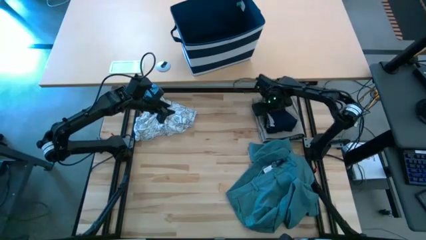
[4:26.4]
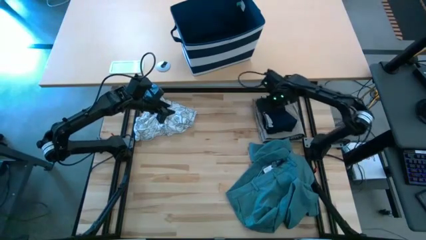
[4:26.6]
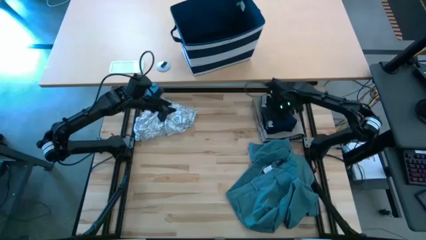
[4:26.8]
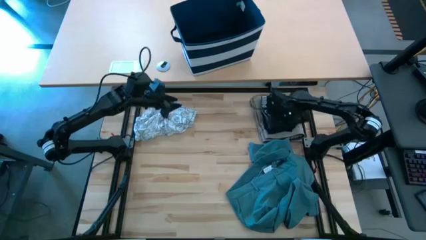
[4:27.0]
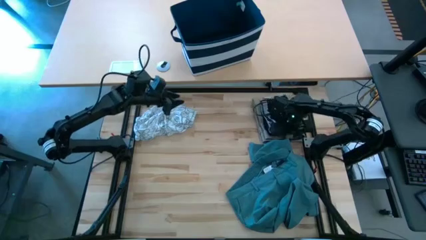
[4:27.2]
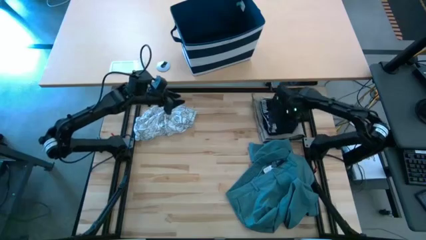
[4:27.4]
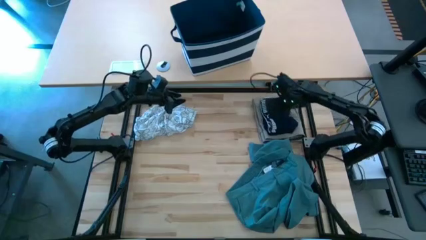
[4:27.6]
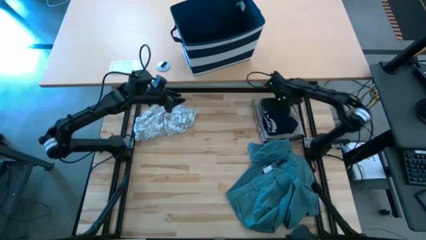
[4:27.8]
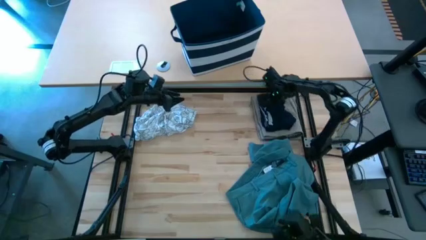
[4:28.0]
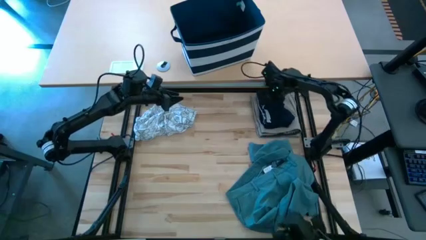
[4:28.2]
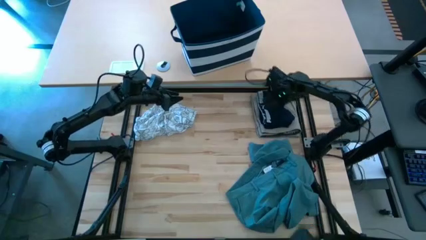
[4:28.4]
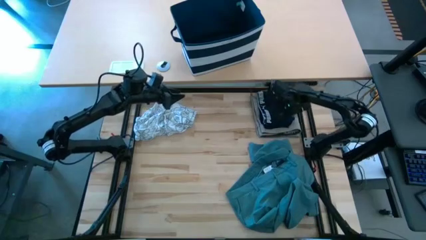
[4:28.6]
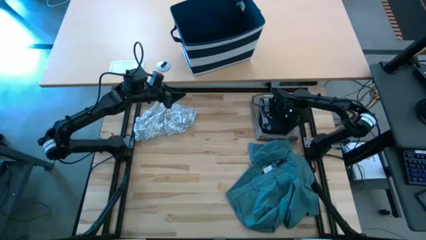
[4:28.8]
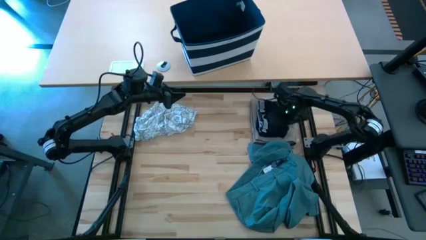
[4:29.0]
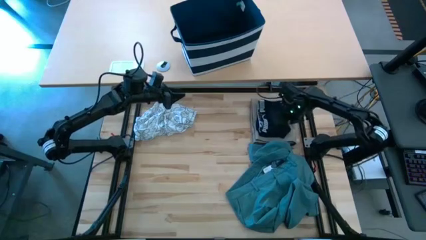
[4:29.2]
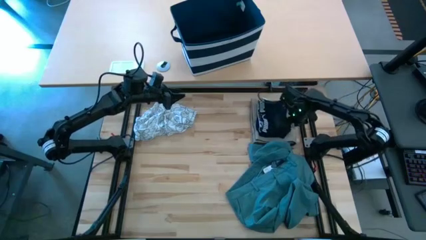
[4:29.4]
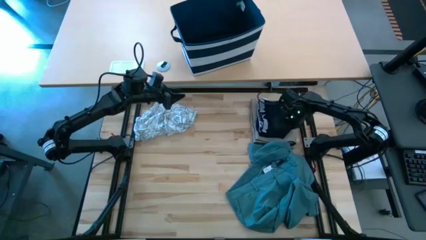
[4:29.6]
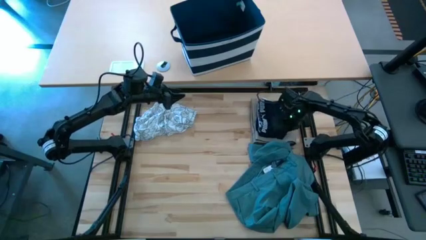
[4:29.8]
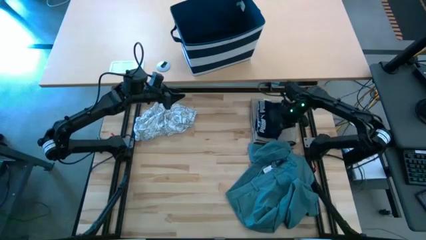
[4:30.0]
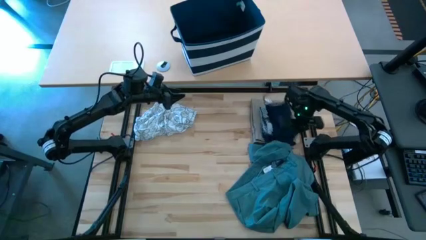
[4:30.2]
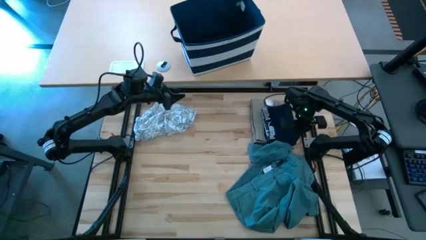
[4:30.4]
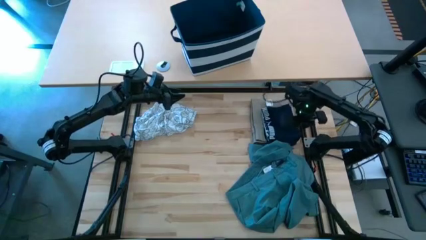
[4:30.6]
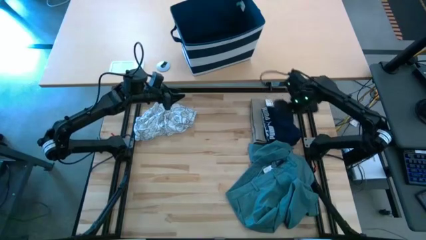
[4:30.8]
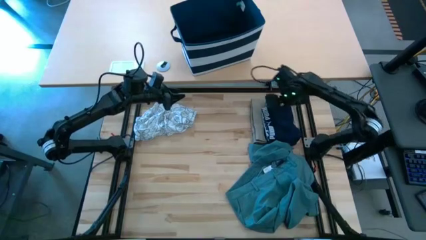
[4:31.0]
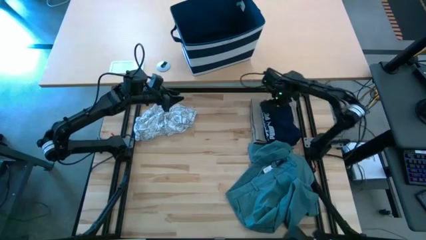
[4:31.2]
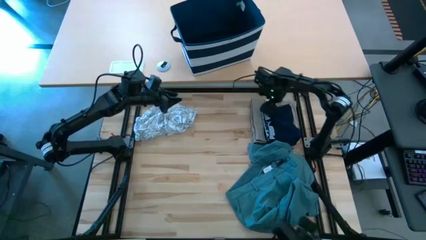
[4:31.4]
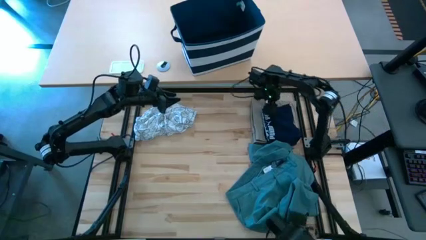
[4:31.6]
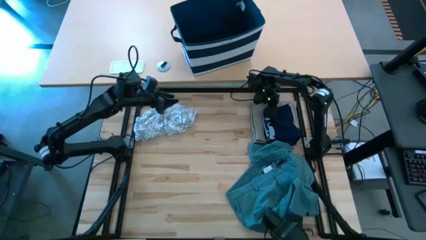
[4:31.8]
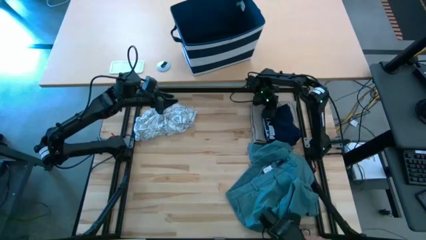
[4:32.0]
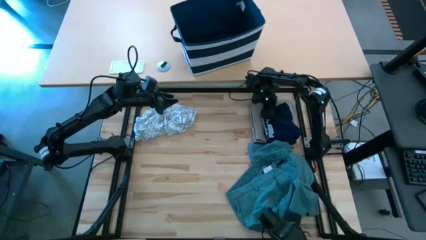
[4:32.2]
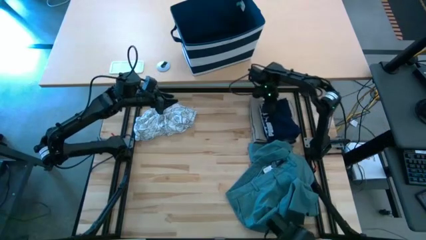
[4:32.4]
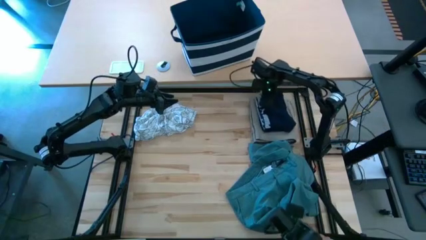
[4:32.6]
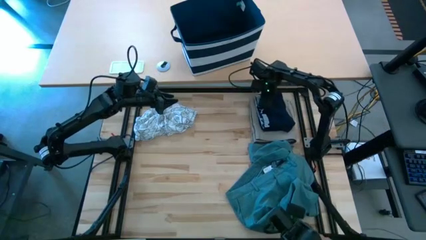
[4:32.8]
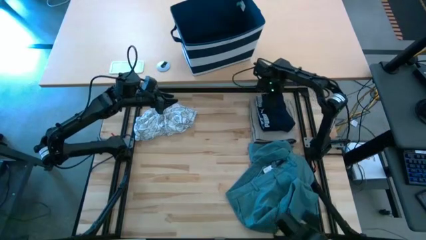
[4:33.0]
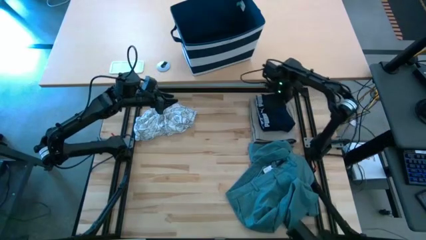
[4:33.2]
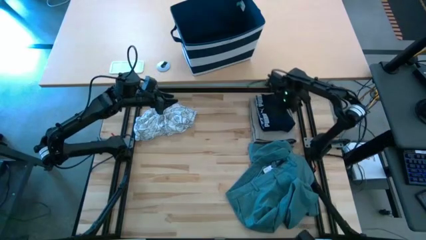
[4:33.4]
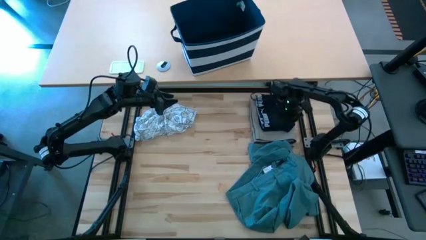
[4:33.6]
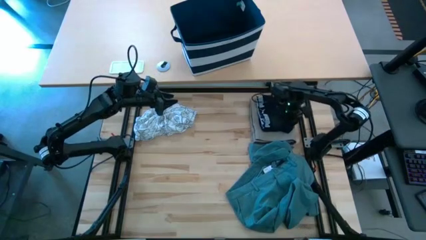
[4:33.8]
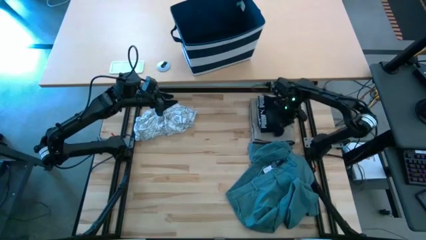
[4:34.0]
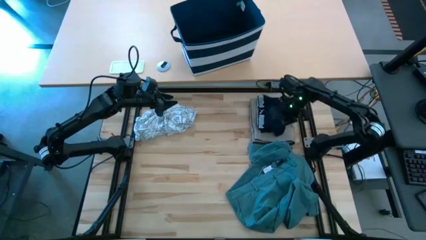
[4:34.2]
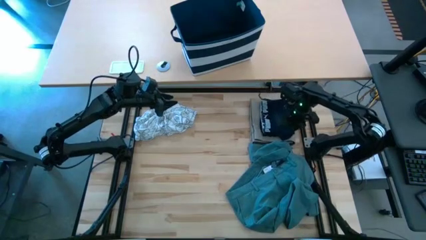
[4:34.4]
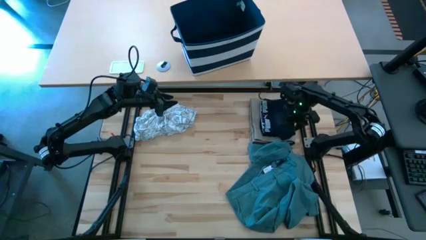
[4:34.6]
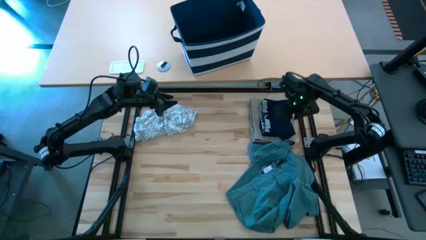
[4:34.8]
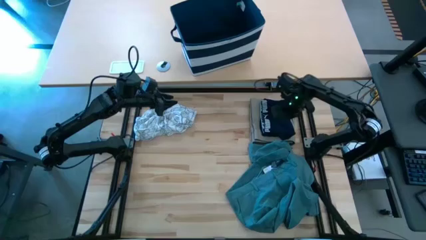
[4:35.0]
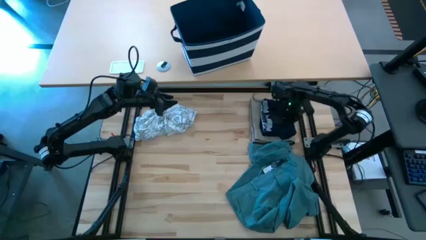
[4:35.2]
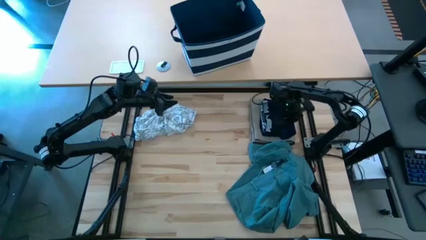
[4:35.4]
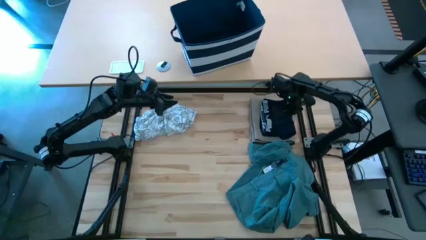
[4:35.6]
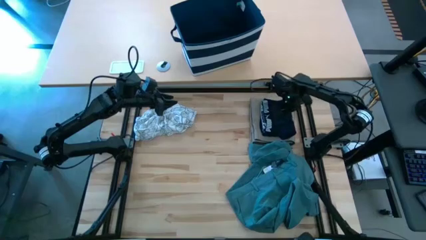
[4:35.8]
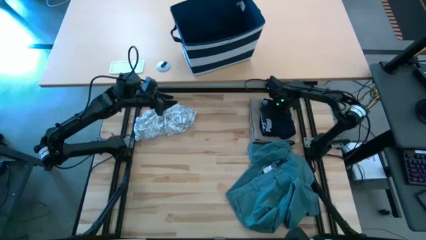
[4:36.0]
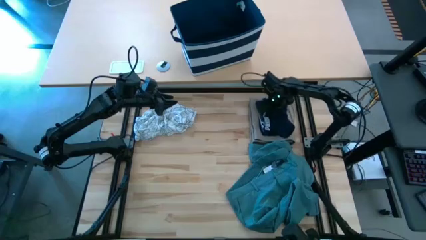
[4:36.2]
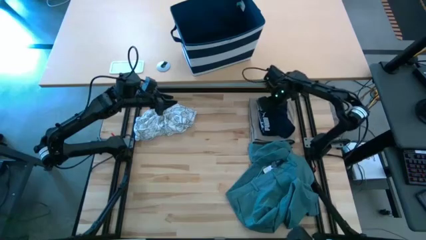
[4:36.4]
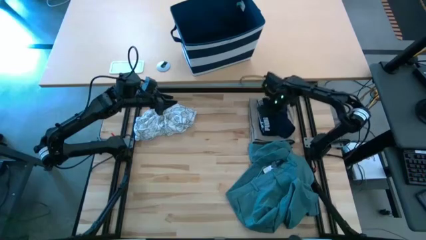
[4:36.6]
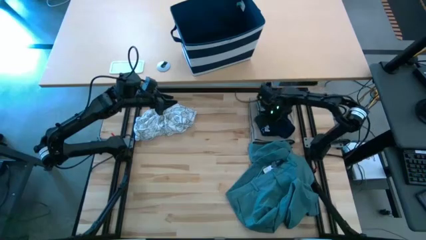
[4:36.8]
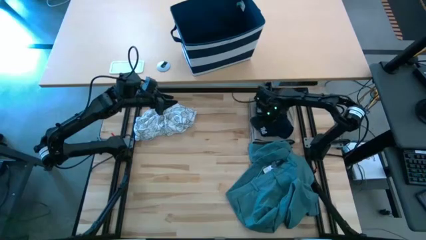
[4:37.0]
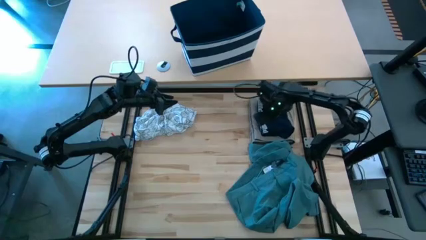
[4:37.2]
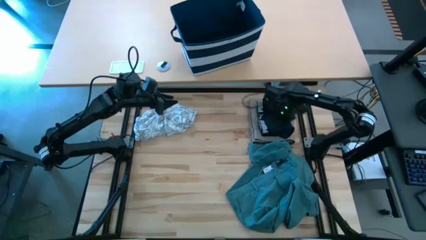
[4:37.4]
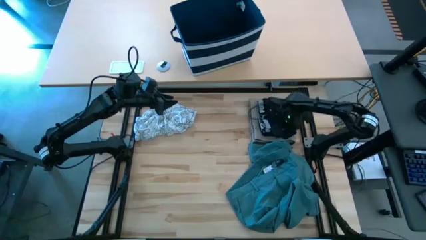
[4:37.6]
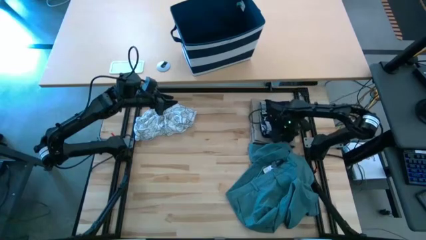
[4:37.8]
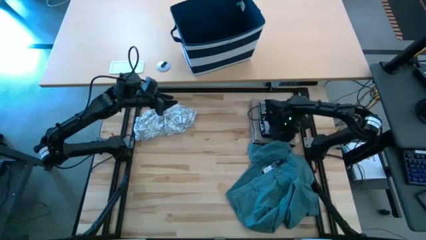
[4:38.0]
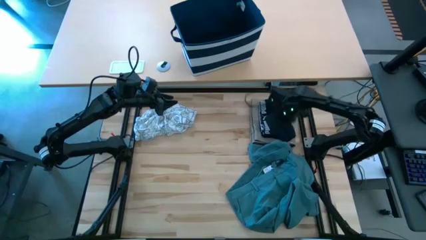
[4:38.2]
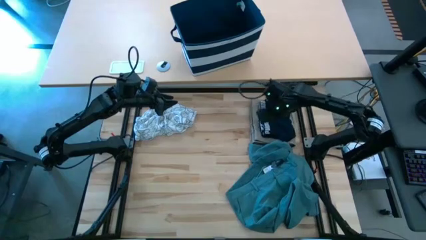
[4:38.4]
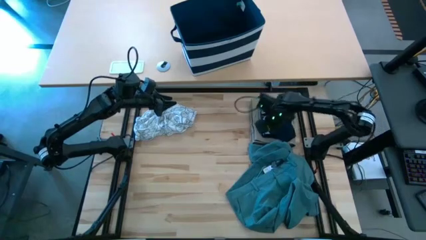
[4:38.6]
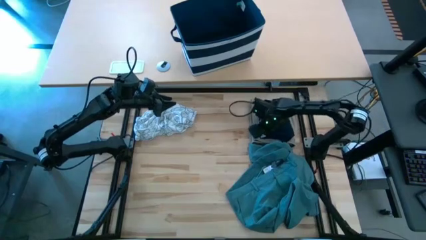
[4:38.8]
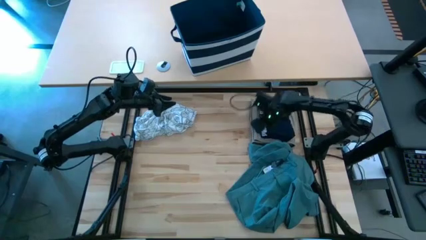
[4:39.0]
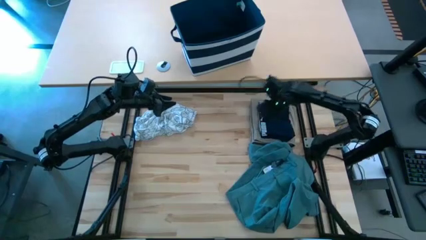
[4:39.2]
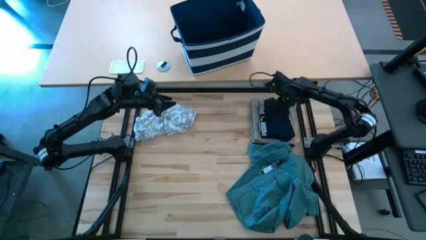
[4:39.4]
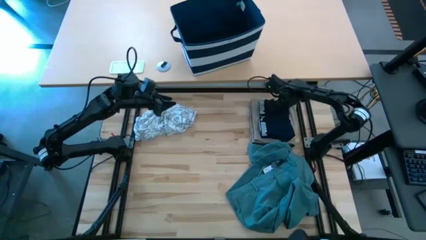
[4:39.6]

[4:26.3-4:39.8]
Task: Fold Laundry from Bin
Stack the folded blue boxer on top of the folded brown shorts

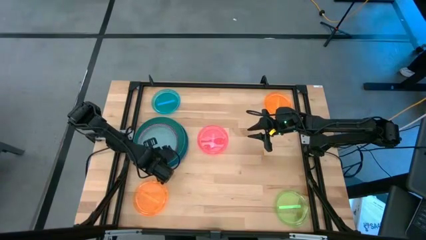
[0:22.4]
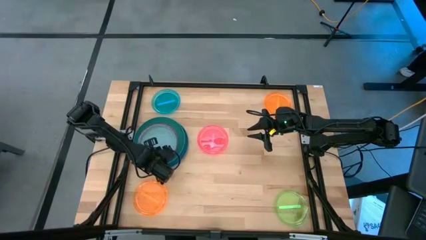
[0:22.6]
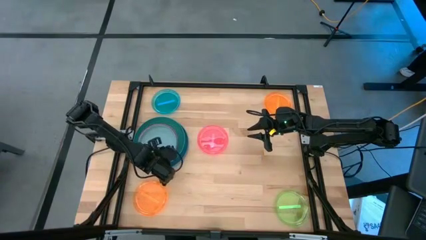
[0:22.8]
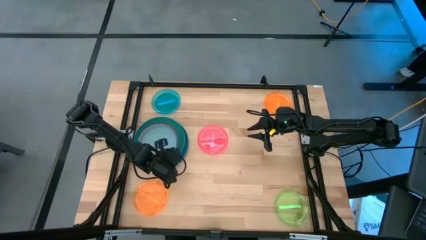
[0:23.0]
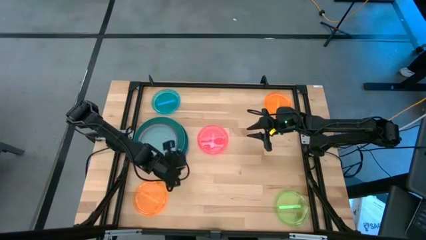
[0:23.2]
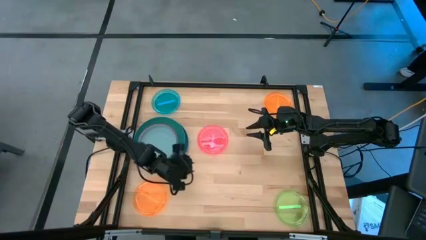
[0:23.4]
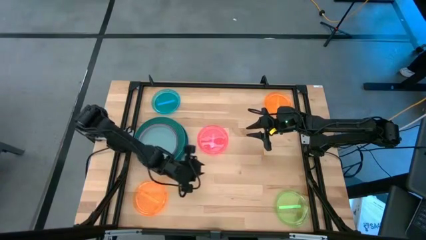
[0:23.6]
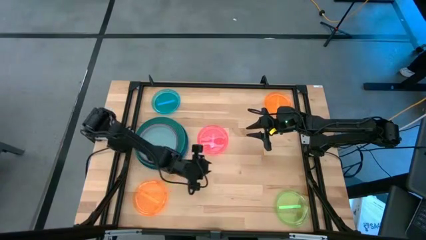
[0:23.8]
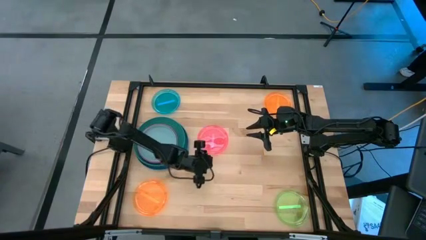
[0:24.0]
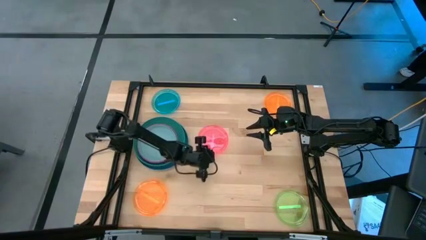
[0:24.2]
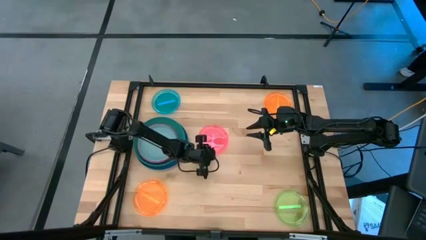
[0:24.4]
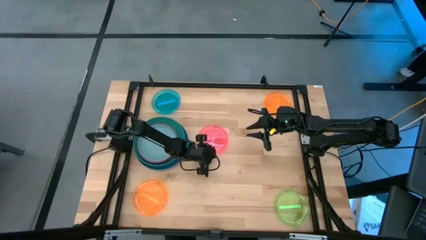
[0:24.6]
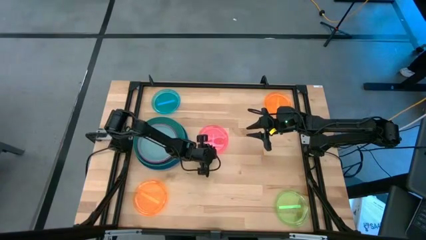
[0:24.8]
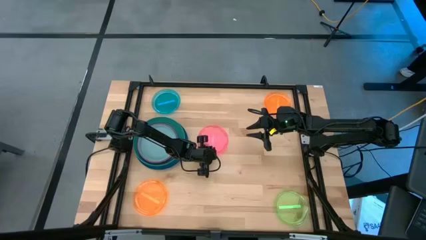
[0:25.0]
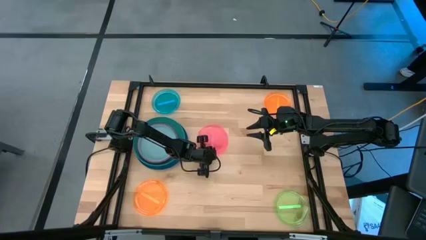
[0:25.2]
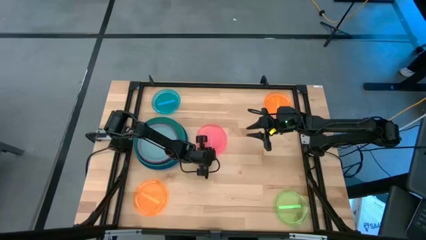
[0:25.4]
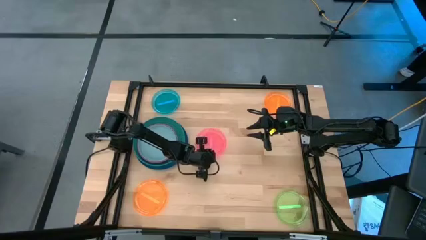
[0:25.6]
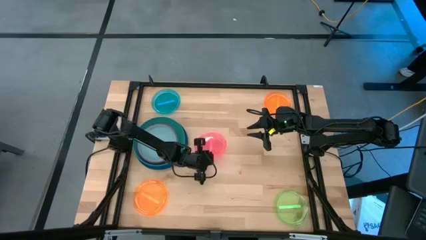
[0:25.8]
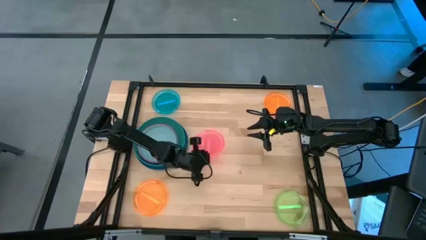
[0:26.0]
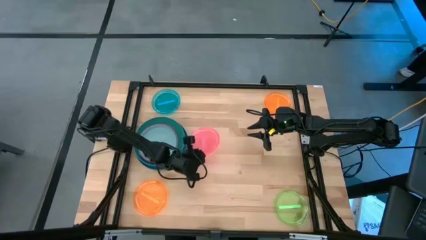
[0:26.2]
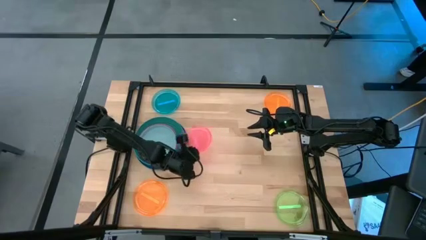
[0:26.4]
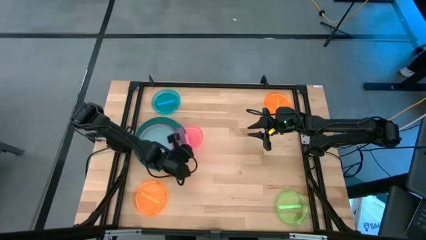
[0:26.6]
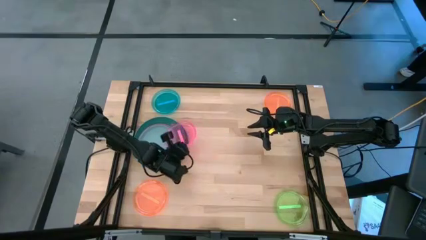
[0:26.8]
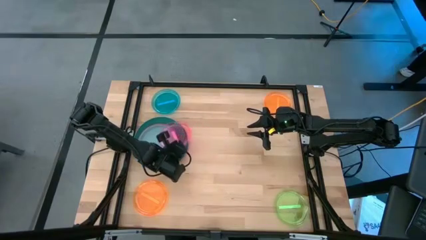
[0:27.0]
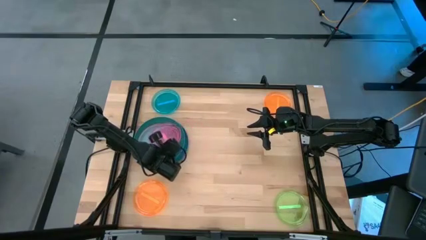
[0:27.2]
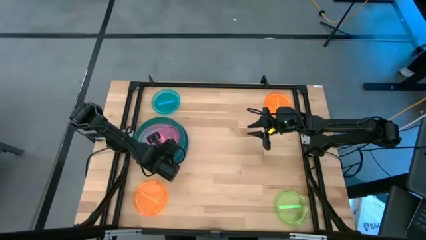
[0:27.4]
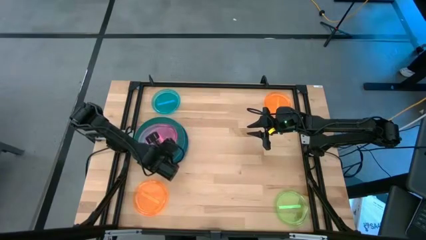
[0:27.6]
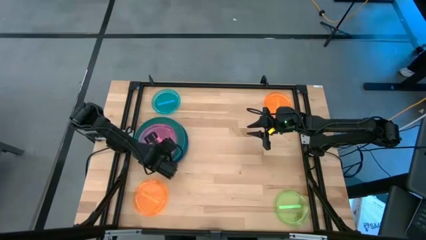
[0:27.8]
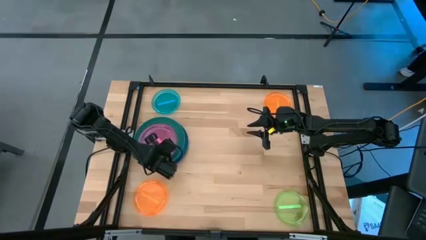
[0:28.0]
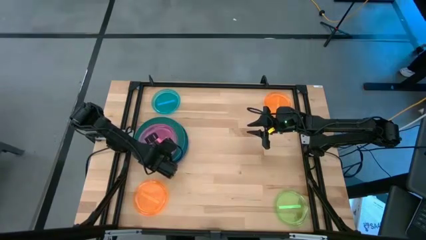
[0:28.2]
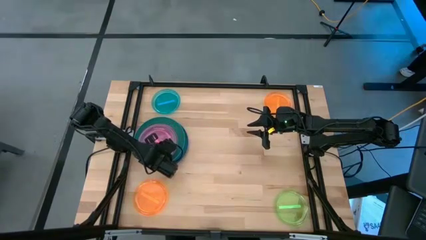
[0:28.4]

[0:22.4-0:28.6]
Task: Stack plastic plates
Stack the pink plate on top of the light blue plate
